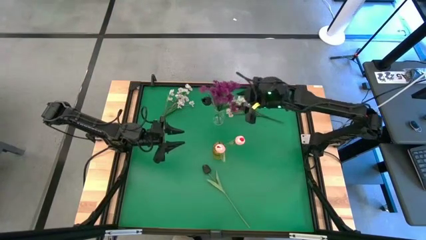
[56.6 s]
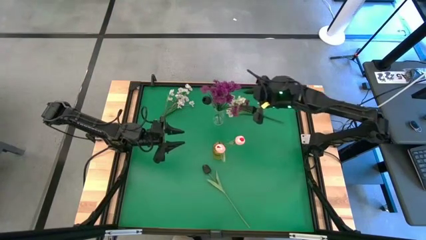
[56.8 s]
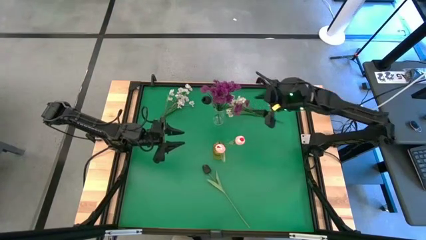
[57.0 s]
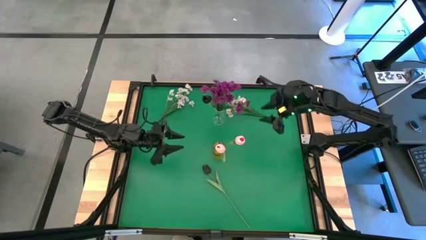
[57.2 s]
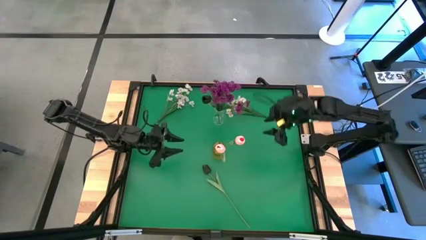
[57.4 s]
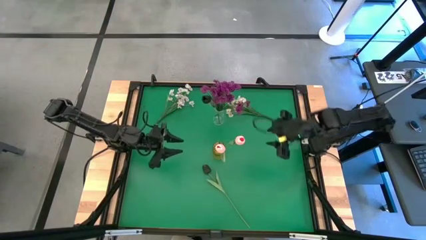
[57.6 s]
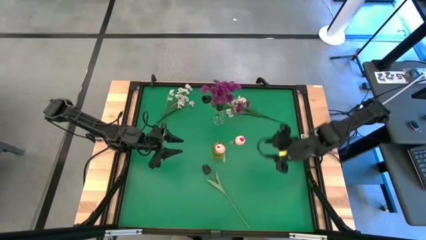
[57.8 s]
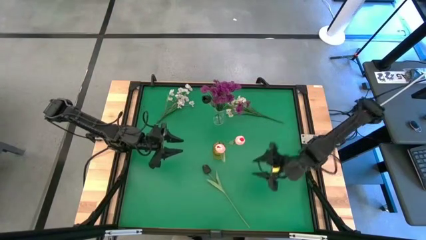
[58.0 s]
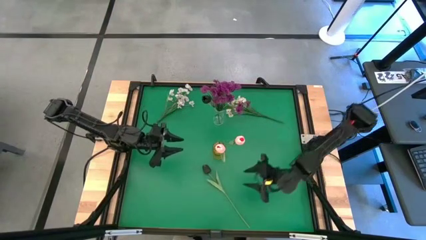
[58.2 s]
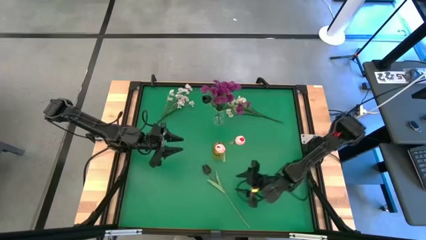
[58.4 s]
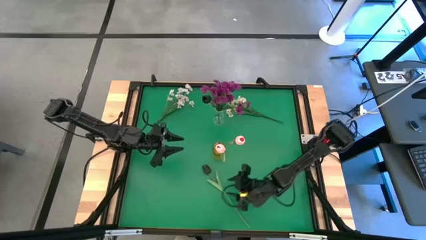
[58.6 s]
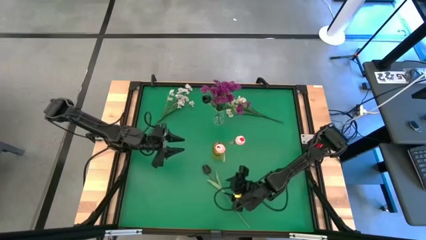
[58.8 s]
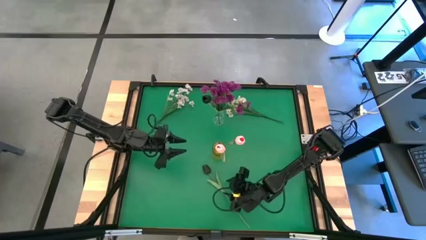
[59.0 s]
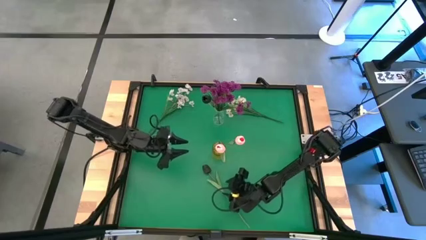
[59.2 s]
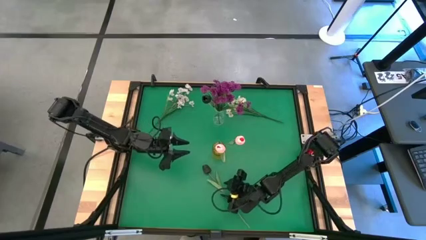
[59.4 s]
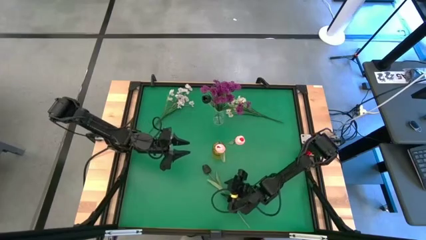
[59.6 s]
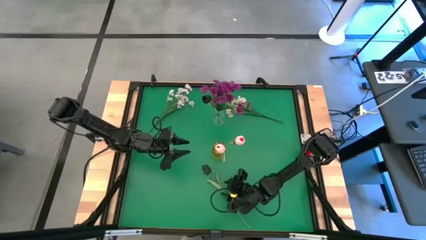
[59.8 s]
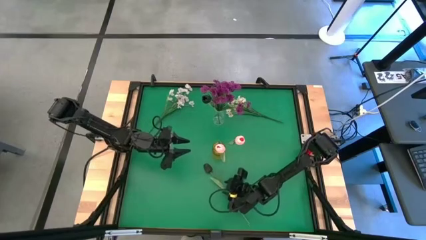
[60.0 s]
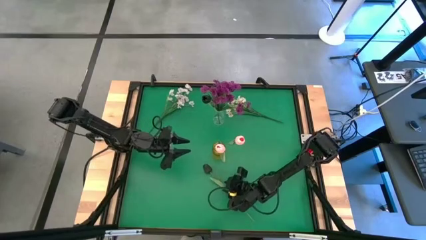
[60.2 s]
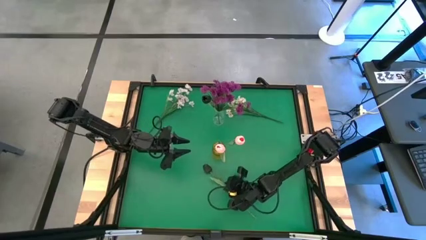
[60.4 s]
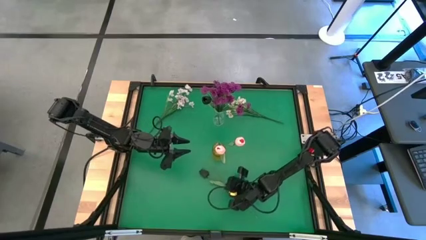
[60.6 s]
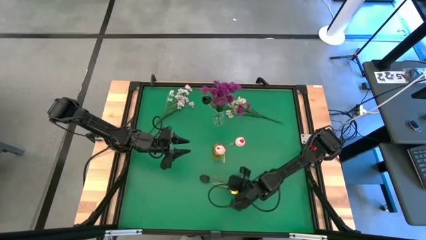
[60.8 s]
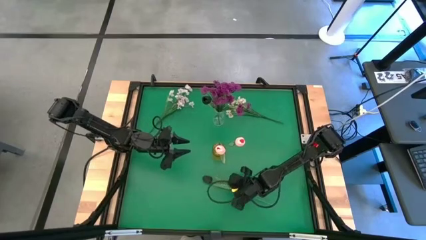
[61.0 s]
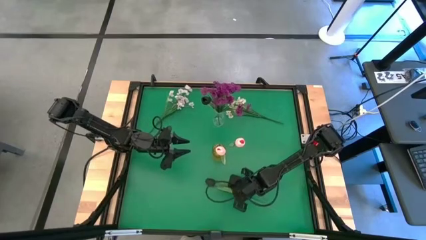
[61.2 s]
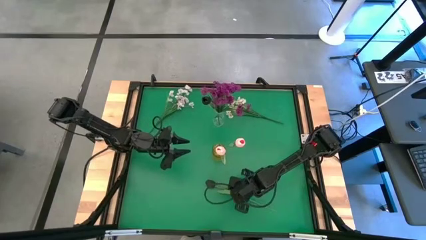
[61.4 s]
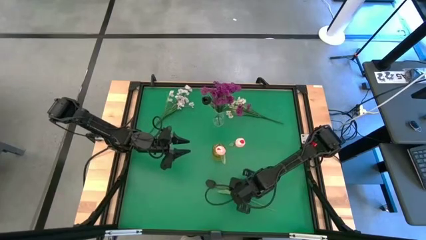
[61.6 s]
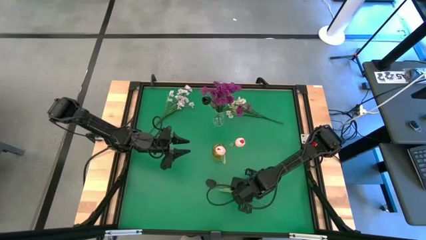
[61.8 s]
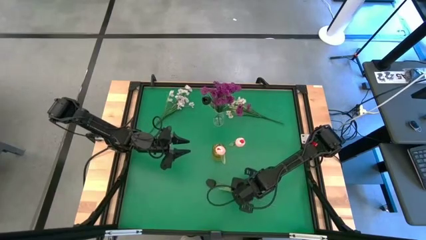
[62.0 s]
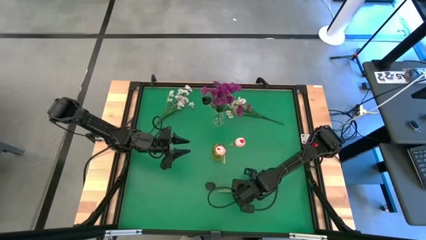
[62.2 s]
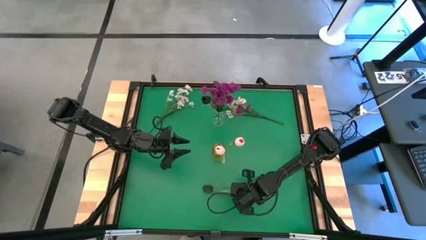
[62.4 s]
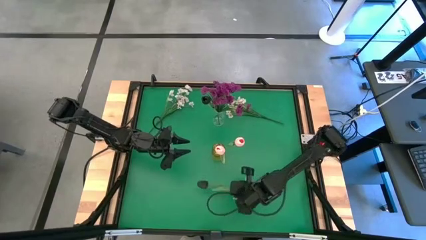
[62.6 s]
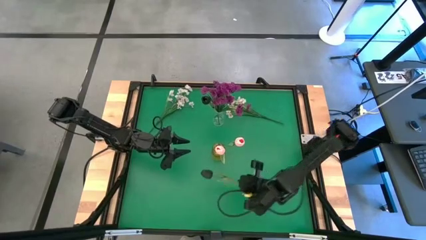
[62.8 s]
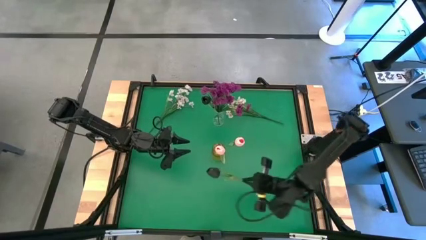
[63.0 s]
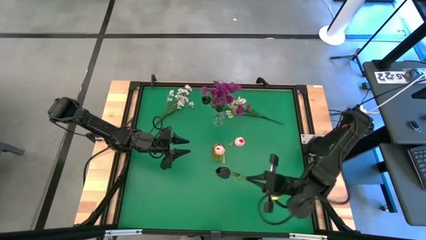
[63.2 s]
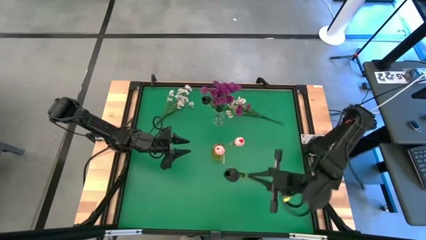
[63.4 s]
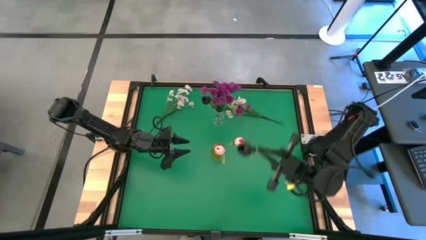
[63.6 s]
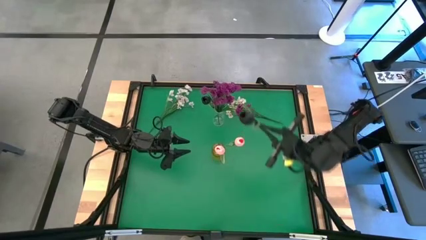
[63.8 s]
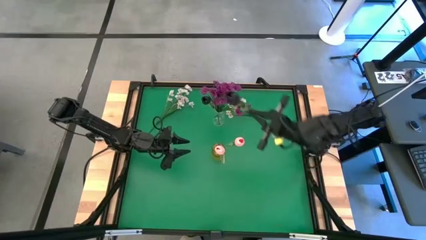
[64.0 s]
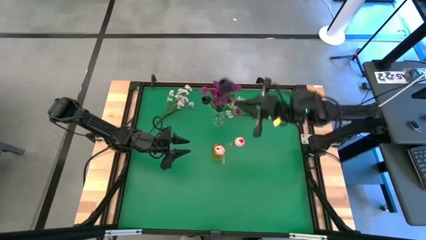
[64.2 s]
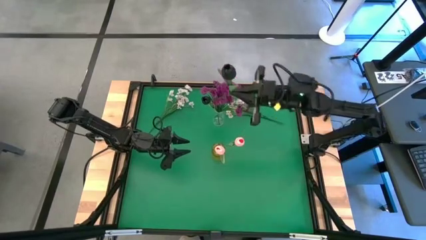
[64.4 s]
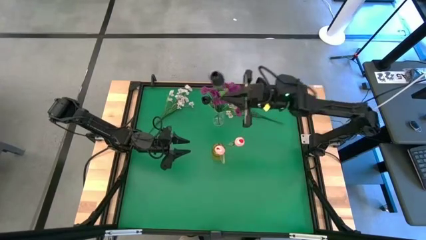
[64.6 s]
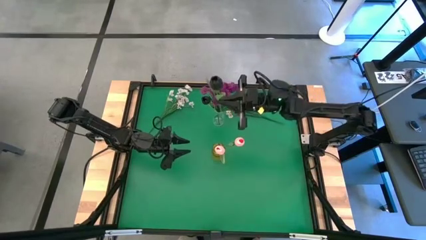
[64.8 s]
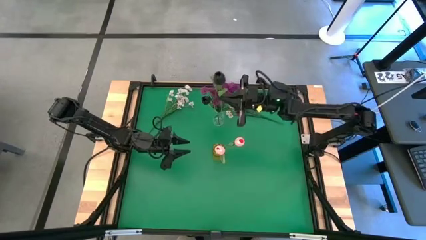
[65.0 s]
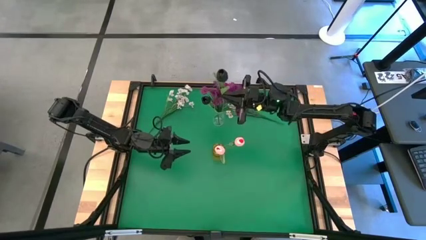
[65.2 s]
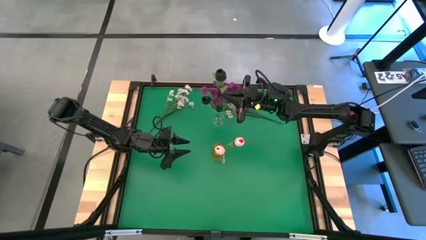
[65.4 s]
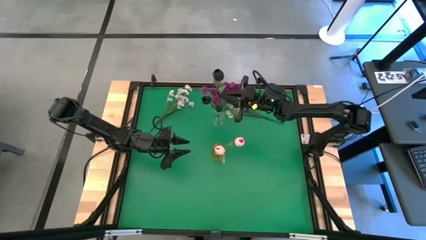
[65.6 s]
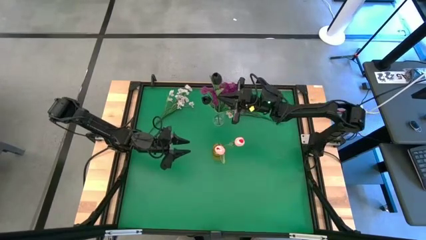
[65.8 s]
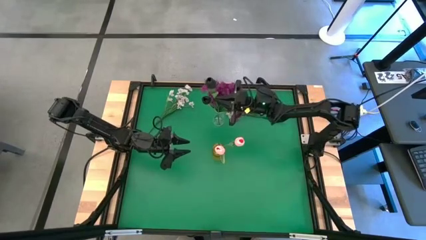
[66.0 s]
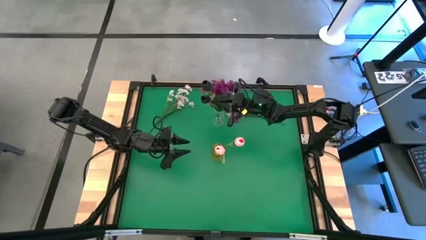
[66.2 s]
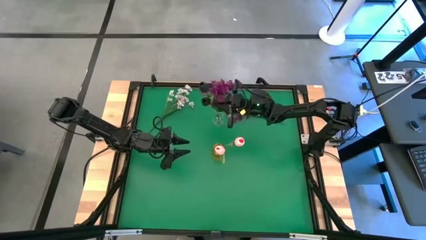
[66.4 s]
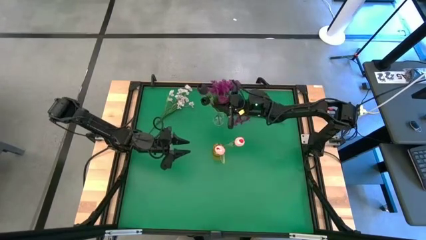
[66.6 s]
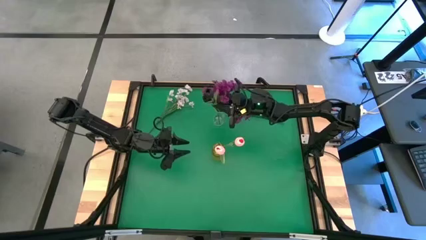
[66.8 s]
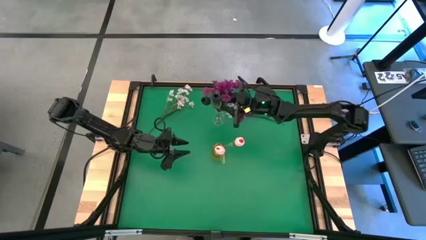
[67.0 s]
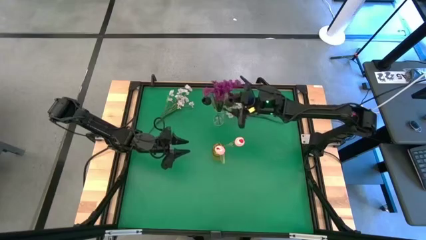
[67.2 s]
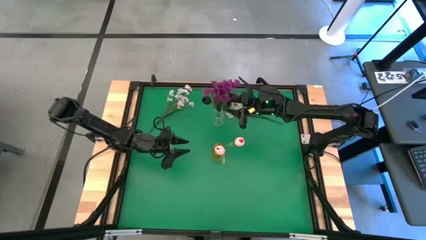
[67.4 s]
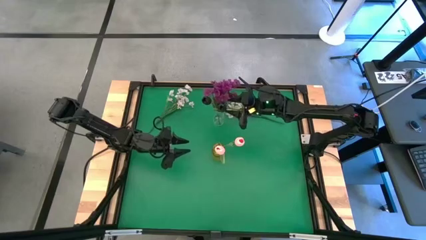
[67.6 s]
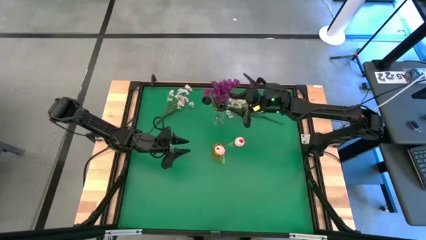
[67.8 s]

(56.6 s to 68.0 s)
Task: Sort flowers into vase by color
Put the black tulip into the transparent vase

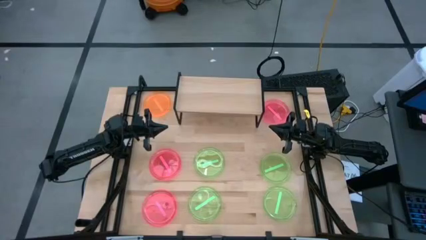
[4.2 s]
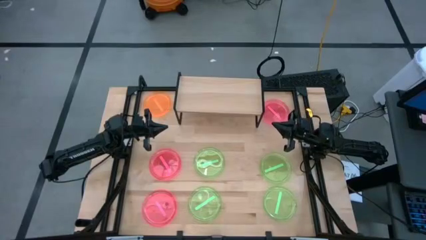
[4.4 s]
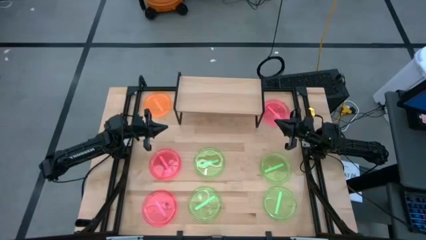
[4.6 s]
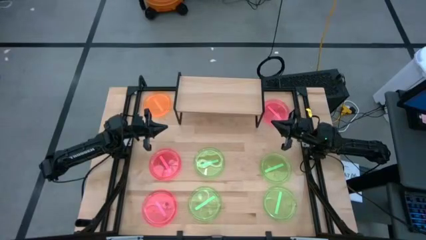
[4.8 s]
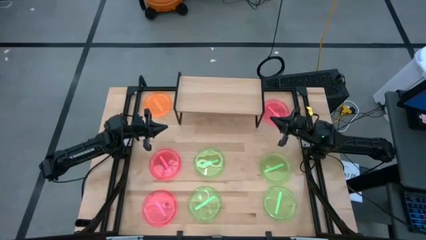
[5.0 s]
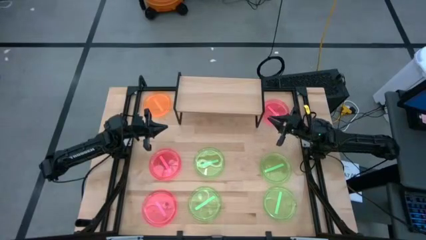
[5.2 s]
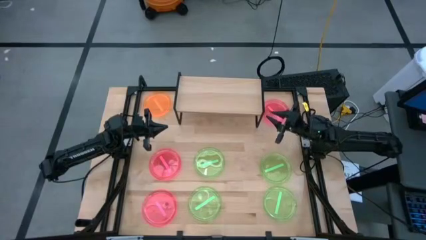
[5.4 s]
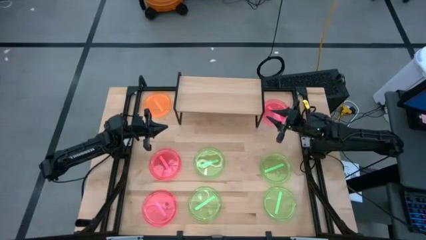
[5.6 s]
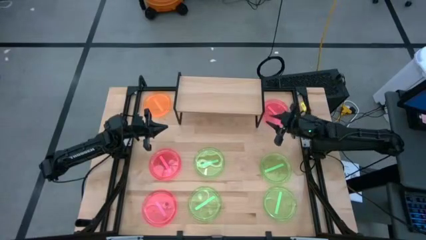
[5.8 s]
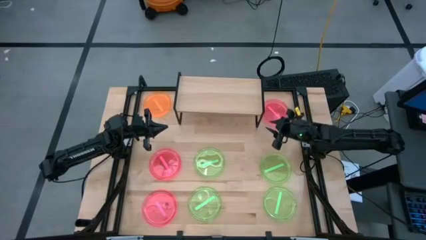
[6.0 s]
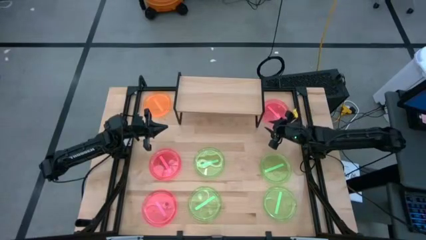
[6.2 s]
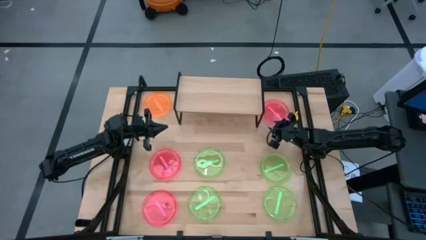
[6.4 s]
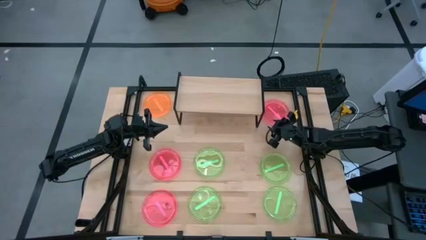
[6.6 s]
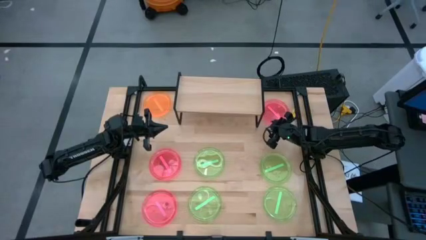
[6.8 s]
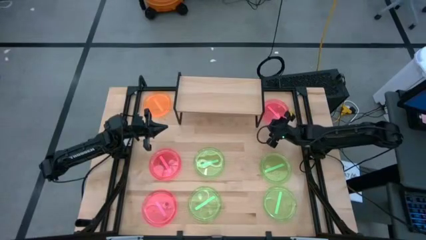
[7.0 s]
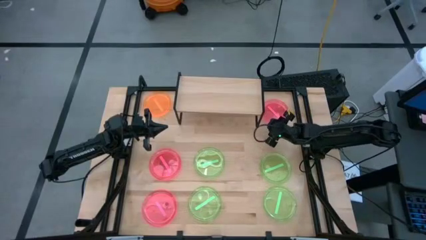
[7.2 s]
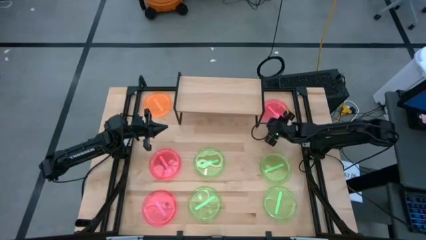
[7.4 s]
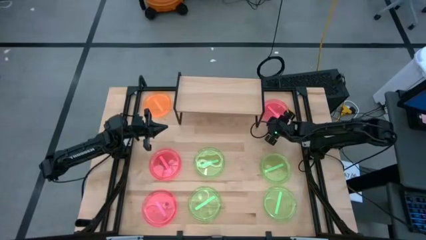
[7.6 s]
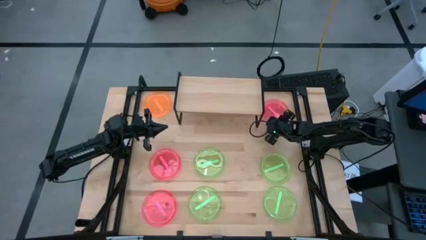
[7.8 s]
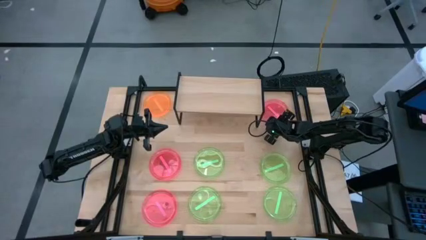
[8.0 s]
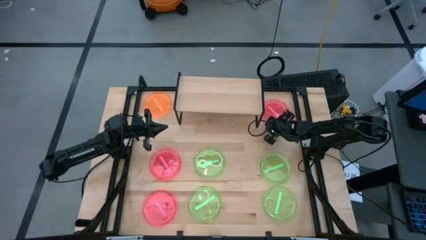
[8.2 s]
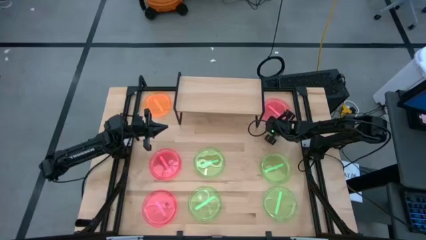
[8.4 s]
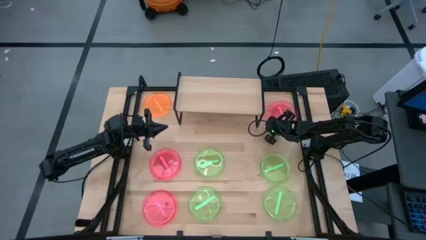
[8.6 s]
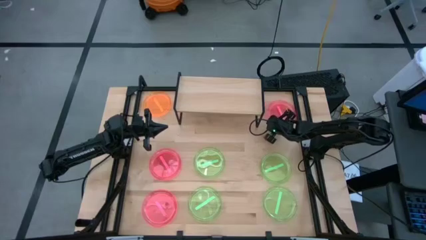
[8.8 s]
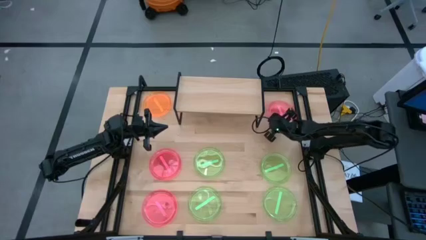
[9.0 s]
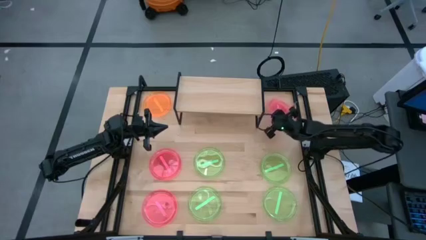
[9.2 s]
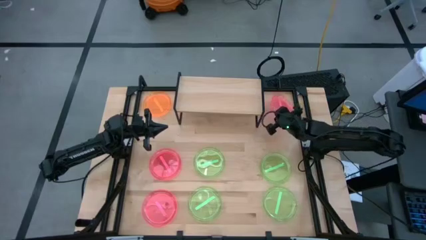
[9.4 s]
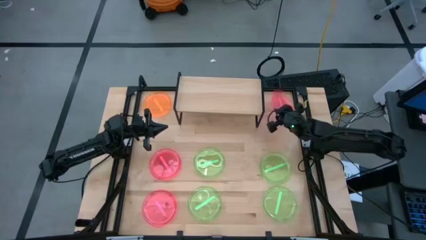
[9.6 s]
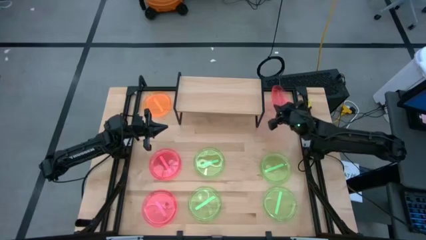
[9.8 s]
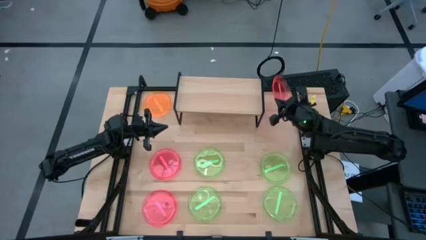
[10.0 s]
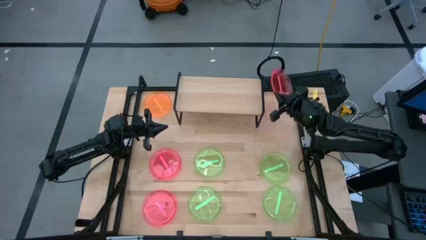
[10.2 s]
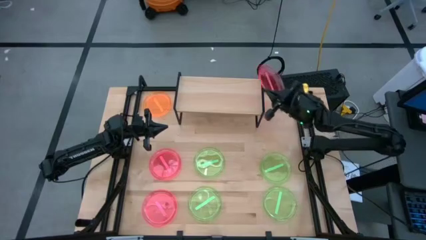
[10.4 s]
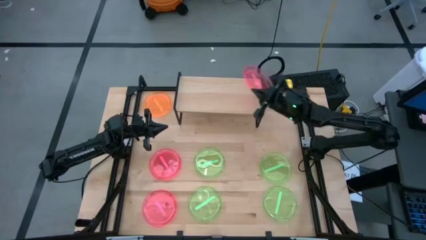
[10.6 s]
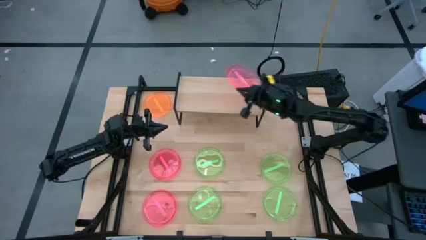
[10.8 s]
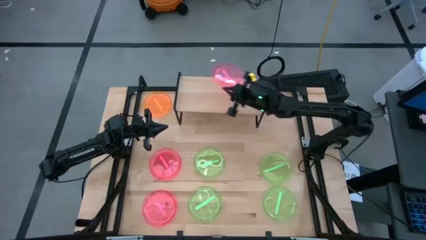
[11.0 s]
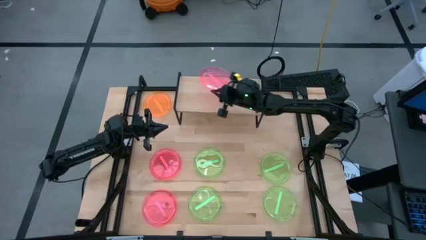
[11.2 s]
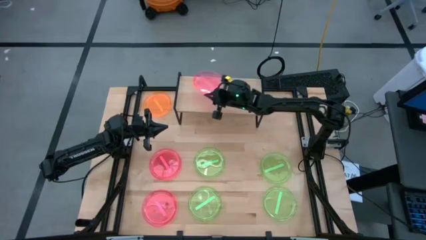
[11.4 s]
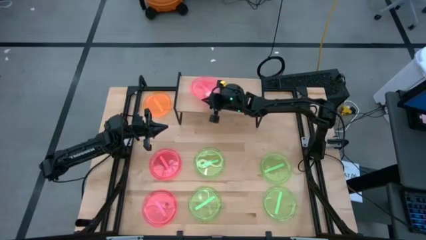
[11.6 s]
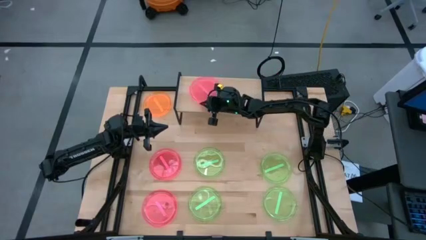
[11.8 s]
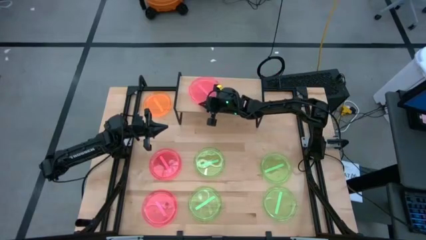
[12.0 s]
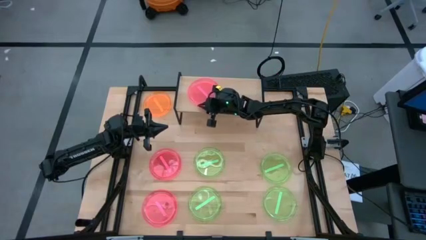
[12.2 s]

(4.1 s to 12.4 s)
Task: Place and stack plates onto a shelf
Put the top right red plate on the shelf
